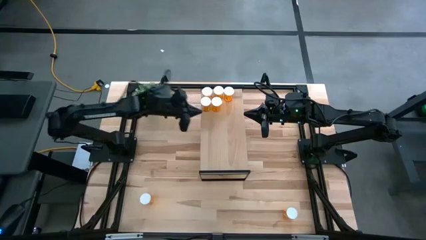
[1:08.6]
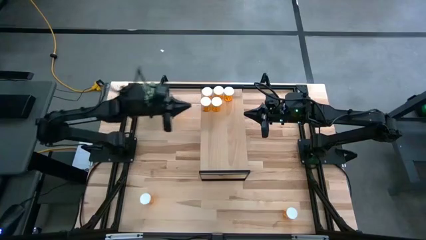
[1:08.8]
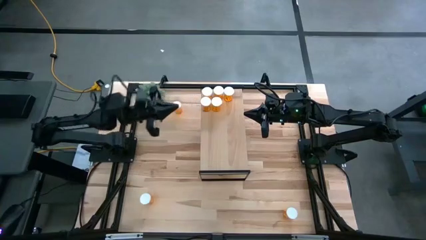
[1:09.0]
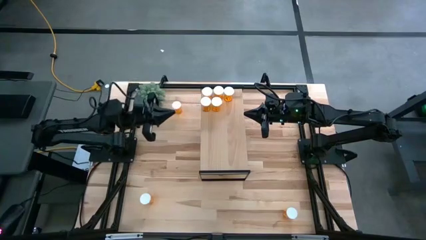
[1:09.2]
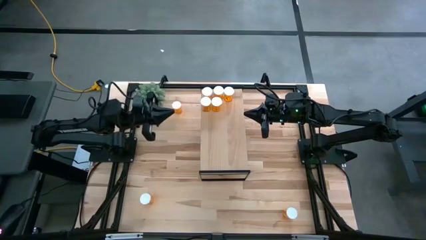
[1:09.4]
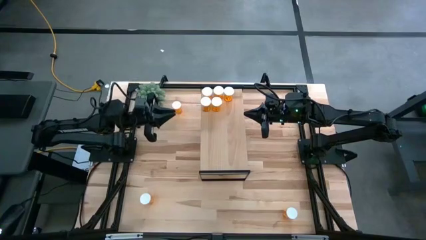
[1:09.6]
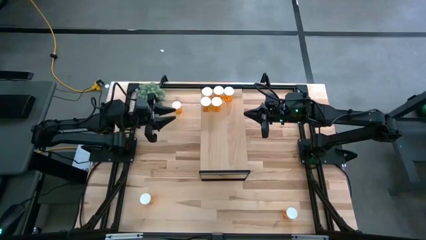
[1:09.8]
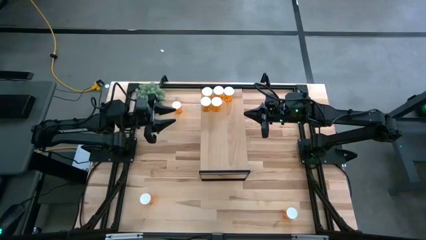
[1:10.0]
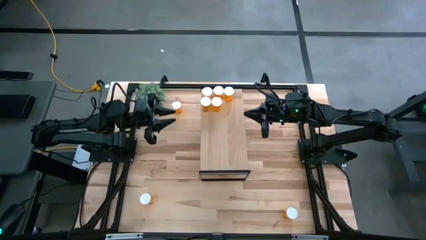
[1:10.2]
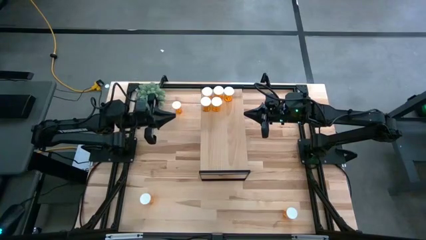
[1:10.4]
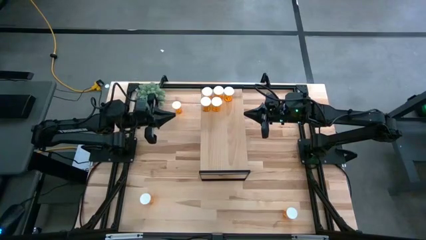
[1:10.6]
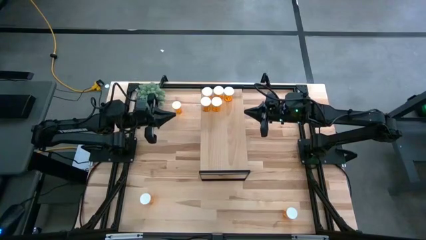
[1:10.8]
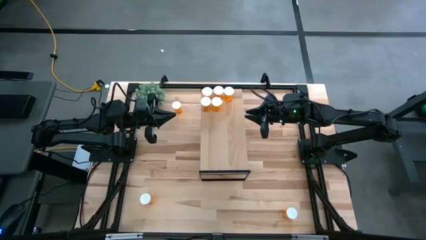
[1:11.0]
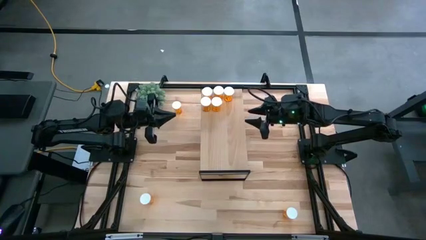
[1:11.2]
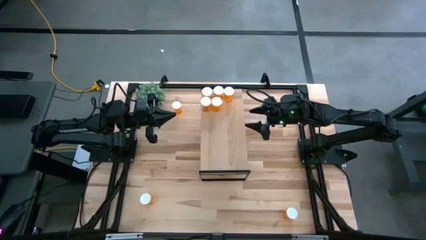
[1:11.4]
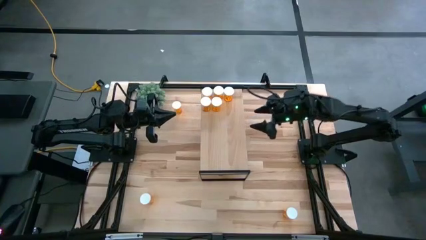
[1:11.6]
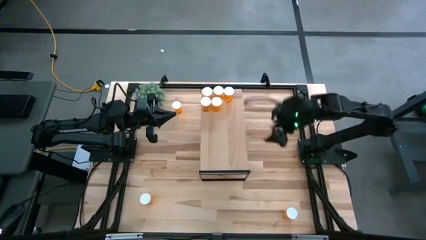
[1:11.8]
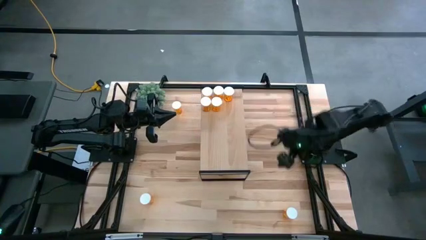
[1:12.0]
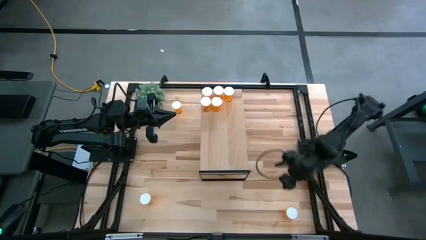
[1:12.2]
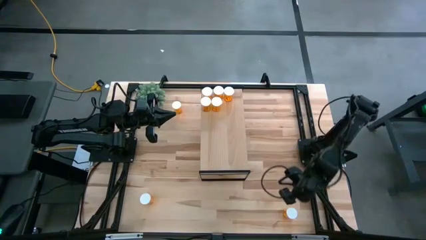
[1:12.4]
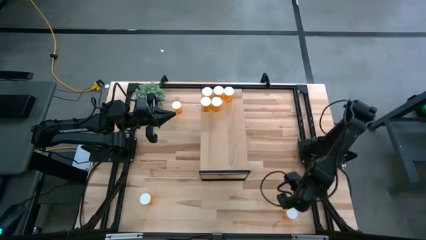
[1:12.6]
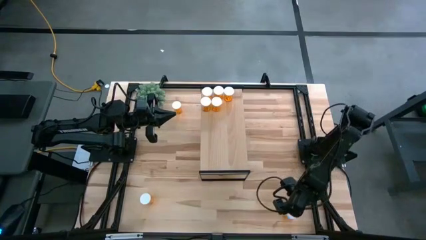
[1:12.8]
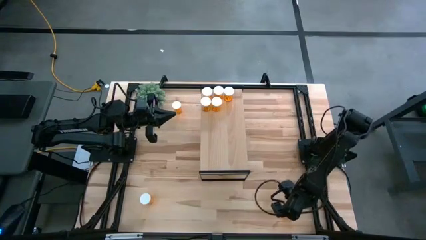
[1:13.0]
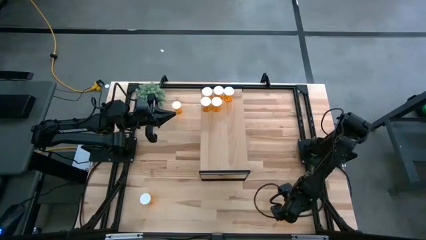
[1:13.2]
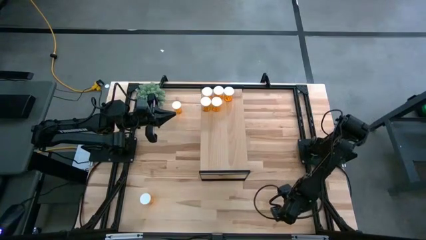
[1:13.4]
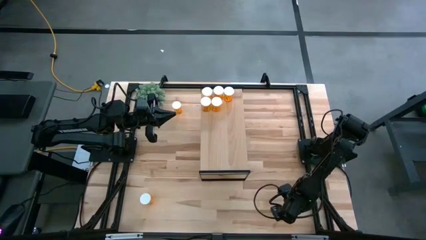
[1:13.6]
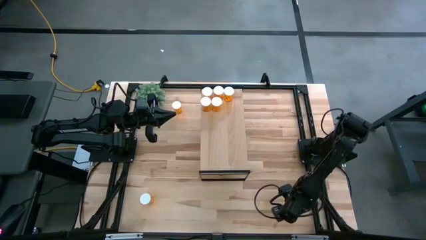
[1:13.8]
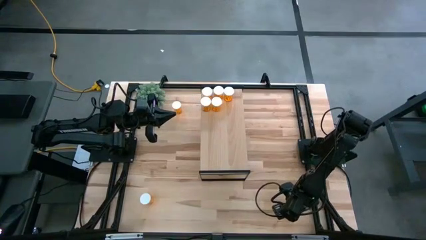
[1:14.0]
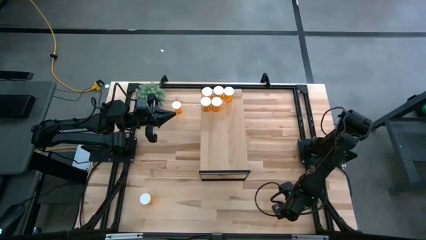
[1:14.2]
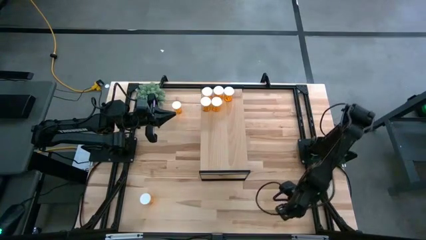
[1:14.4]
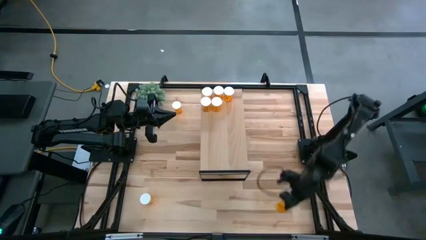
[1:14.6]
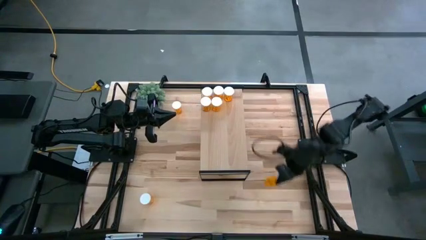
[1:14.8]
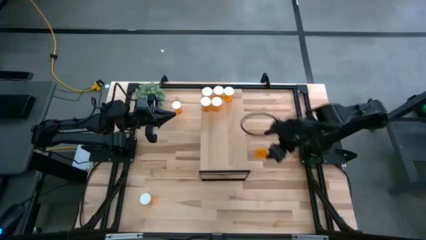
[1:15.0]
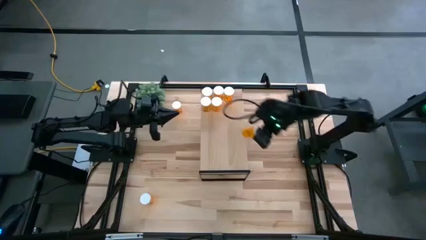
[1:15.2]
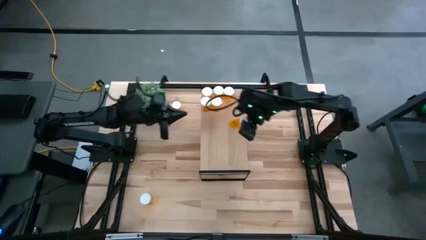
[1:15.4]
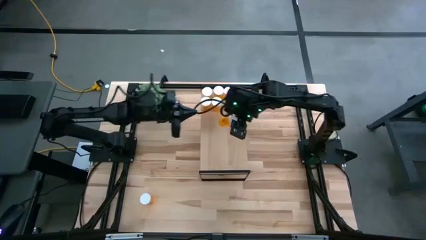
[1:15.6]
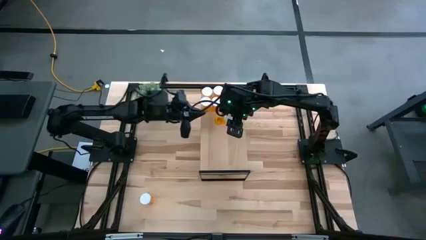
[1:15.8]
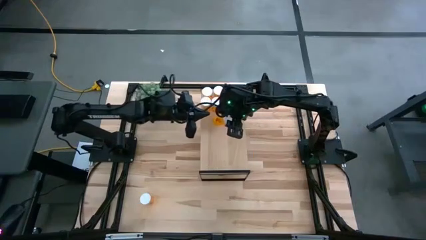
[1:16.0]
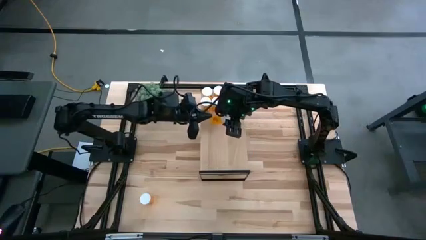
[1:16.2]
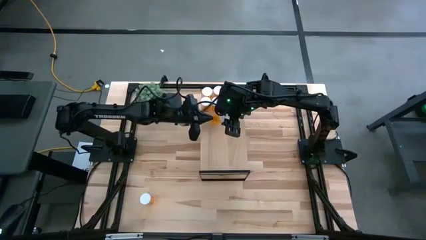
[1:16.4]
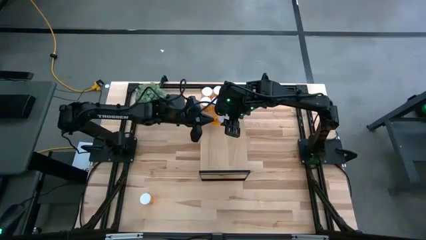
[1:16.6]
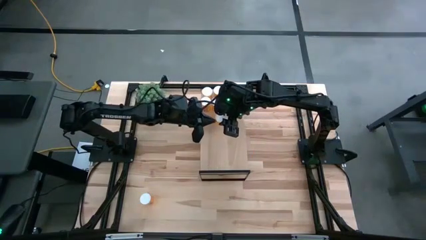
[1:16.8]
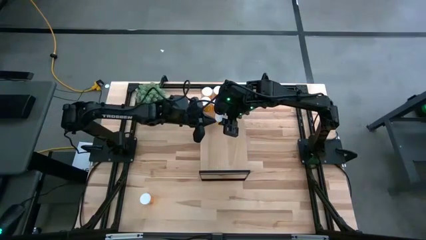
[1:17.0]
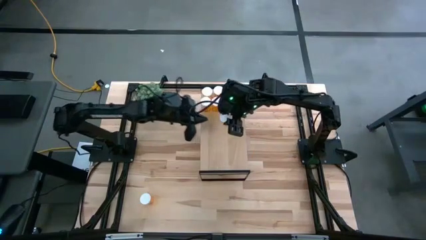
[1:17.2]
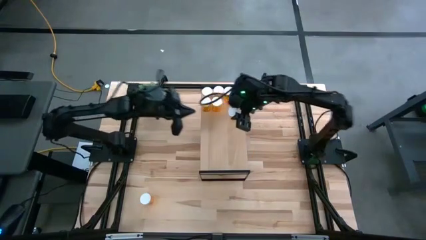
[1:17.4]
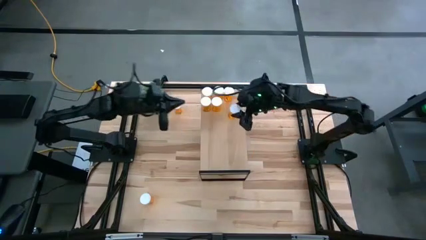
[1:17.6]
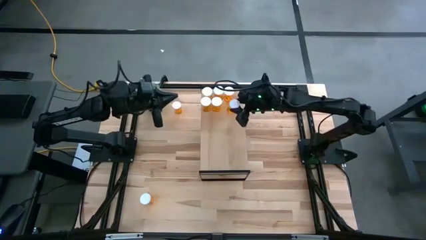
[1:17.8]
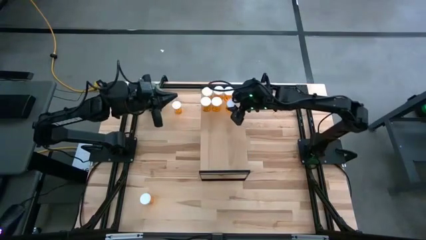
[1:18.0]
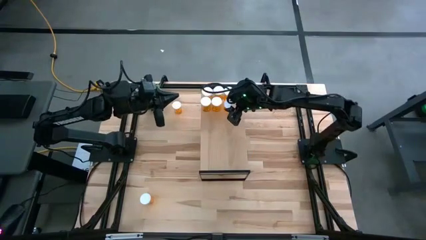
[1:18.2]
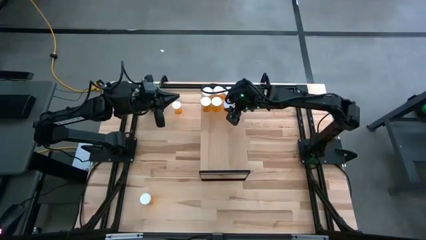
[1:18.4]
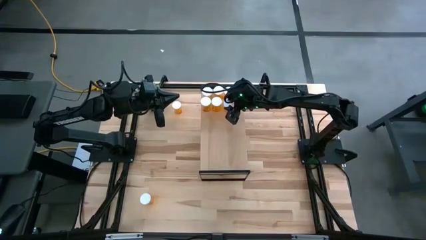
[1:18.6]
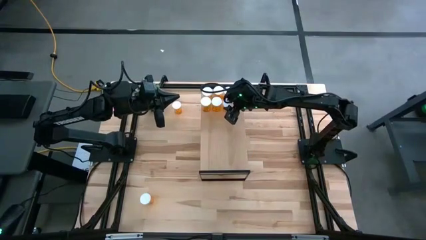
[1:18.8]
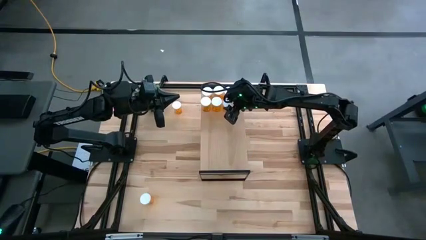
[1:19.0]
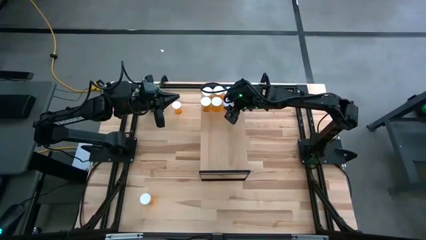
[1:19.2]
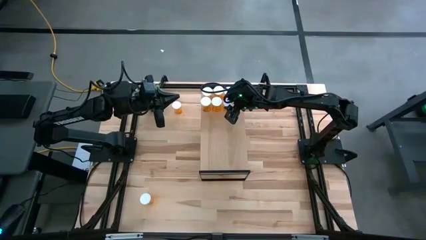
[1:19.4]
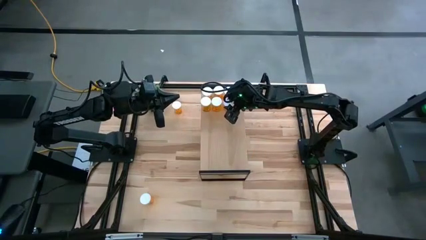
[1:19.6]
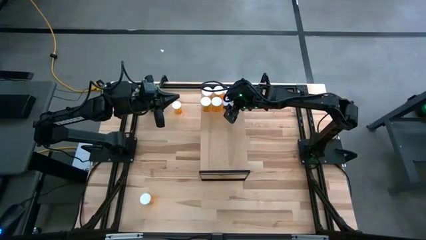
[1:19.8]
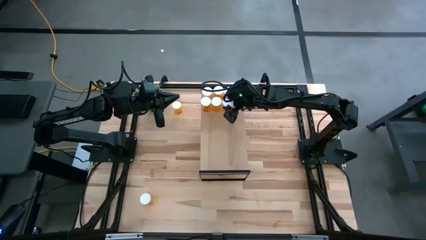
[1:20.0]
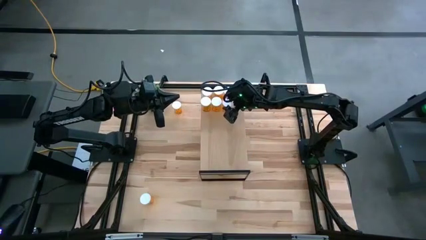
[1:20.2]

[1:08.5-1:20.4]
Task: Pick and place medicine bottles onto shelf by color
Put the orange pill bottle on the shelf

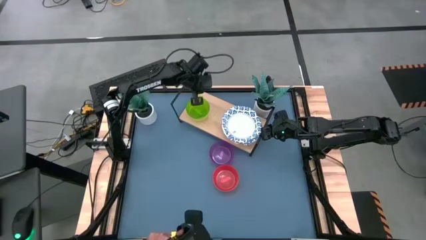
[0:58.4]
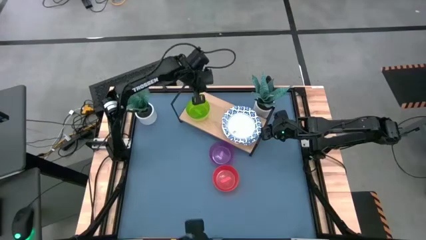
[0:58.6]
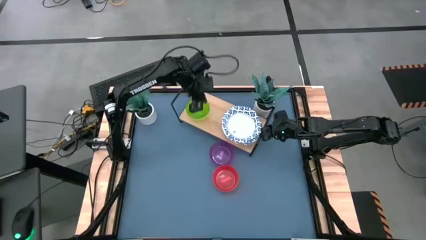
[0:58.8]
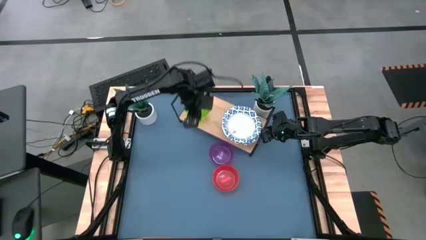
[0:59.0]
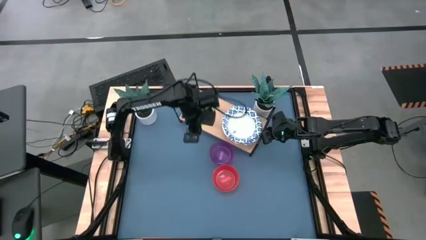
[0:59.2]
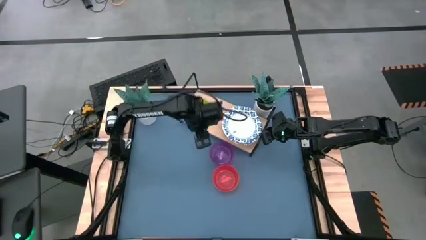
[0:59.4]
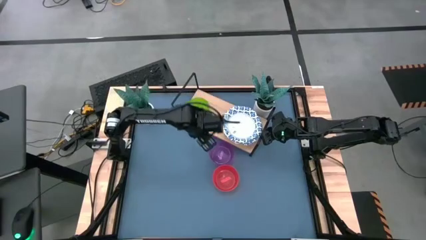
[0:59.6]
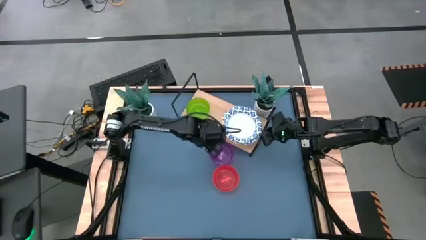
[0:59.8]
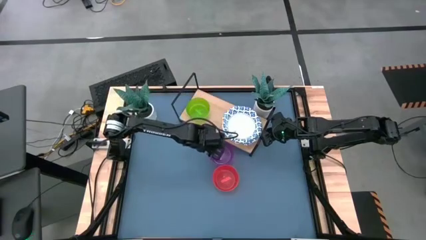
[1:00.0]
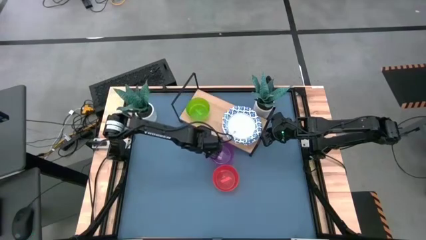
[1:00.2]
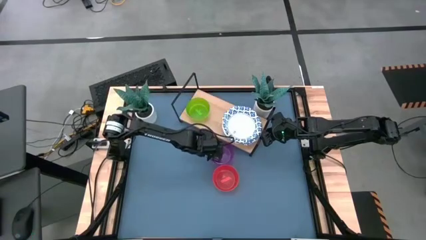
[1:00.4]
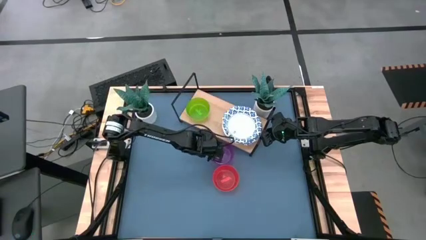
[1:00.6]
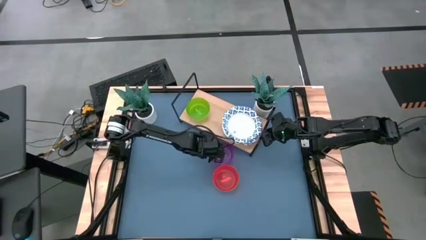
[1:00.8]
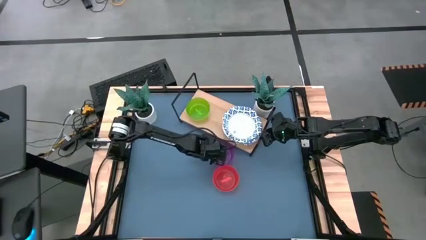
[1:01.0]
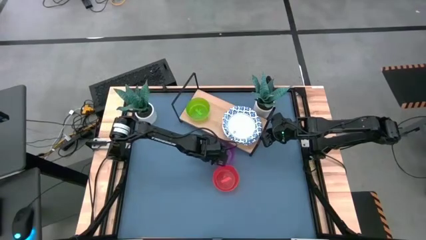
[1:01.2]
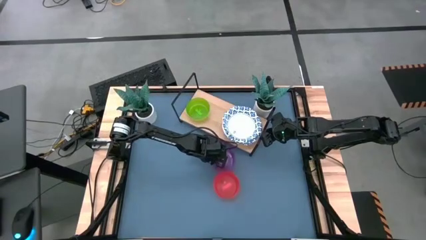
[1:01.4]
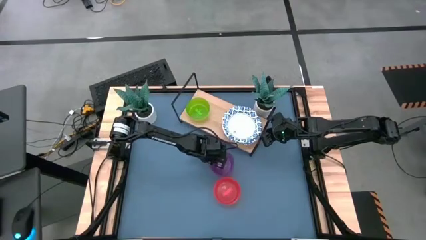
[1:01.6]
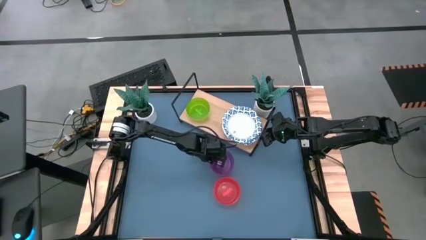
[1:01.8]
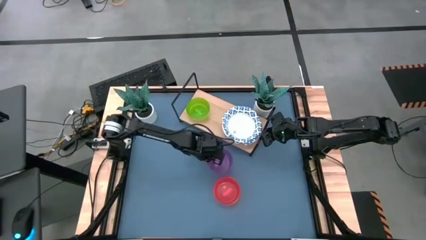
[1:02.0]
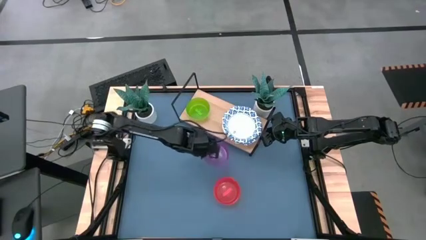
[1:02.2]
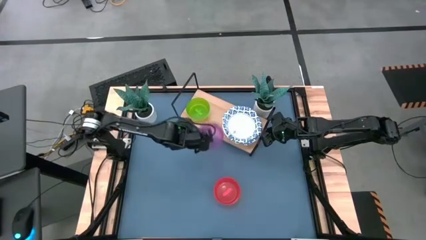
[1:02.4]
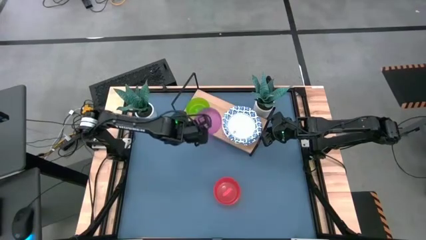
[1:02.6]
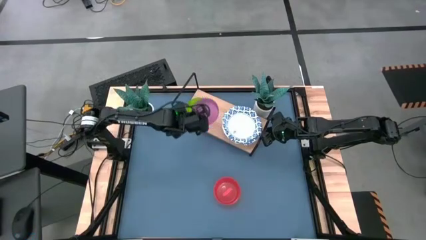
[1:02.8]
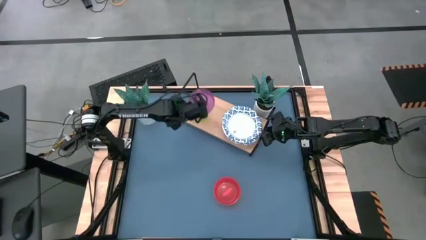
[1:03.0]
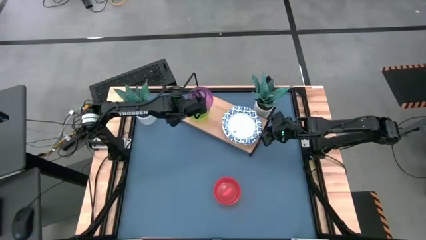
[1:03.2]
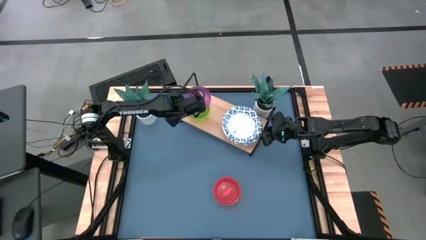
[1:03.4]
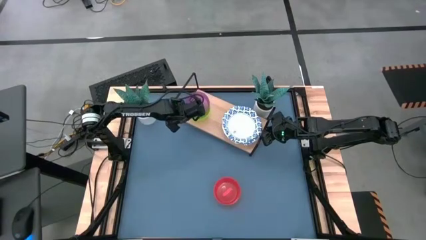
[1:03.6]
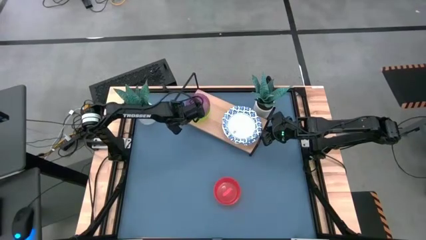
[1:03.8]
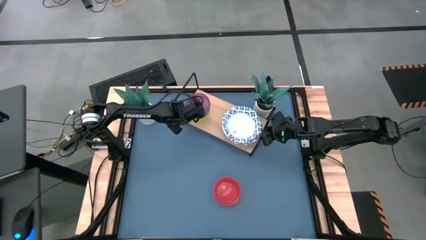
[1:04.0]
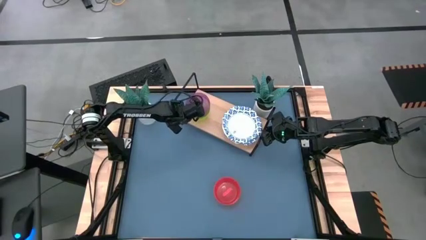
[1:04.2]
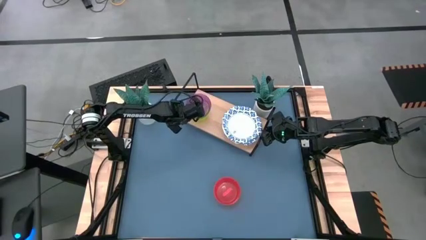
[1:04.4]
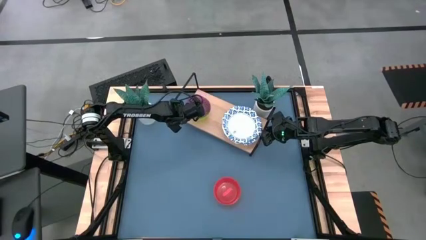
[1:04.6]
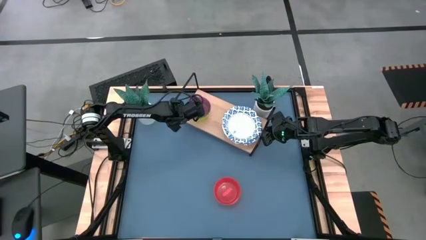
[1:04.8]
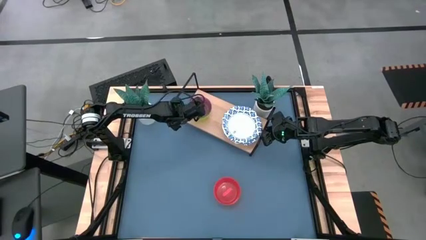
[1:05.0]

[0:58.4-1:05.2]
Task: Place and stack bowls onto a shelf
Stack the purple bowl on top of the green bowl on the shelf
